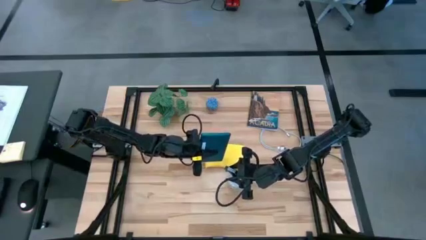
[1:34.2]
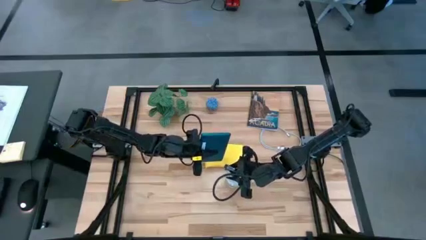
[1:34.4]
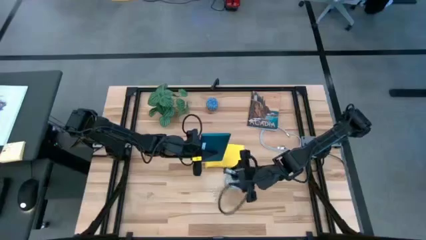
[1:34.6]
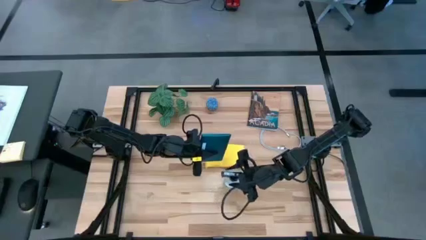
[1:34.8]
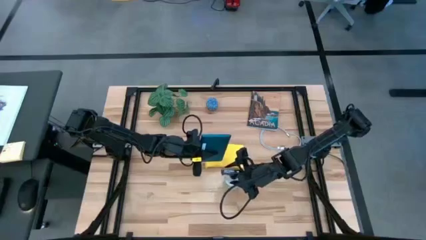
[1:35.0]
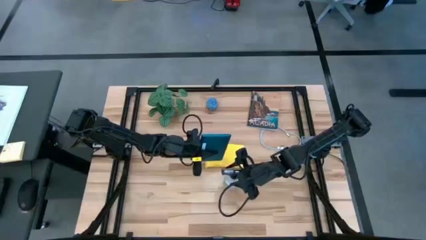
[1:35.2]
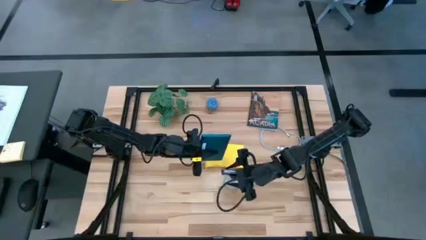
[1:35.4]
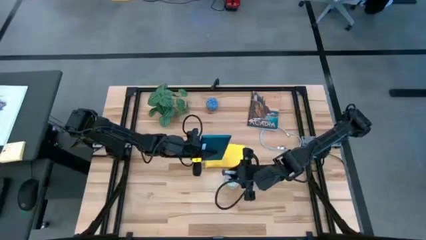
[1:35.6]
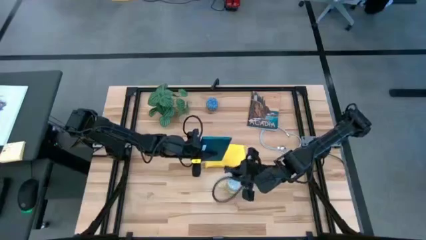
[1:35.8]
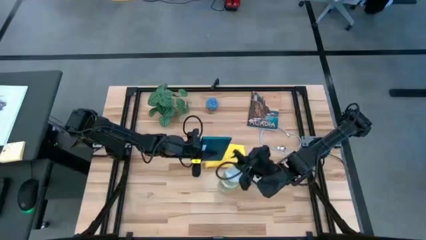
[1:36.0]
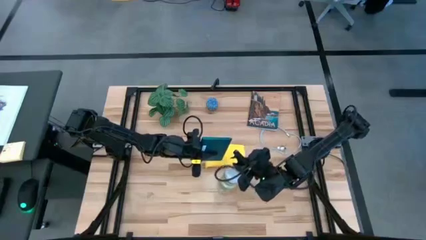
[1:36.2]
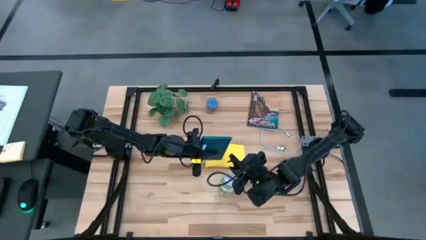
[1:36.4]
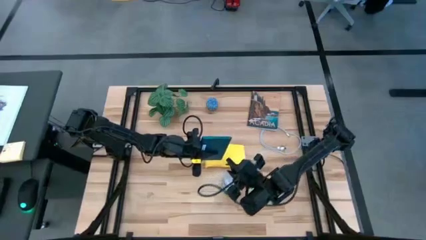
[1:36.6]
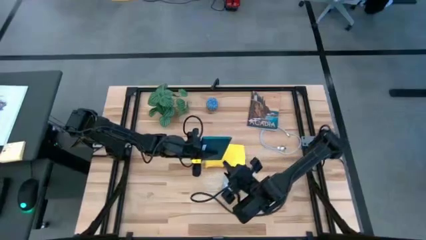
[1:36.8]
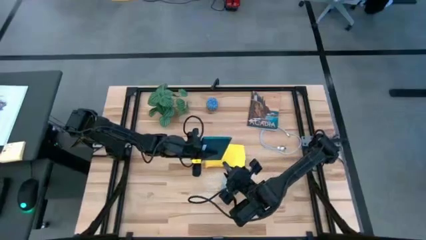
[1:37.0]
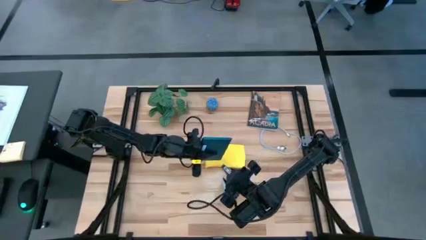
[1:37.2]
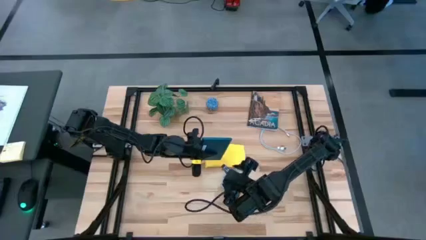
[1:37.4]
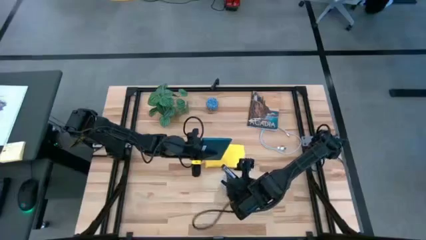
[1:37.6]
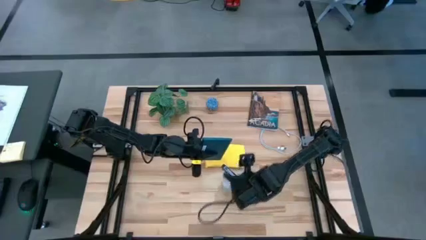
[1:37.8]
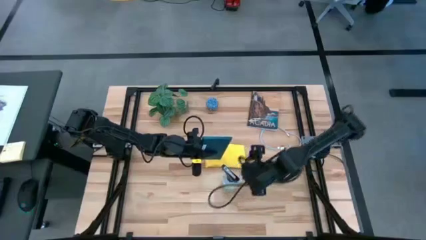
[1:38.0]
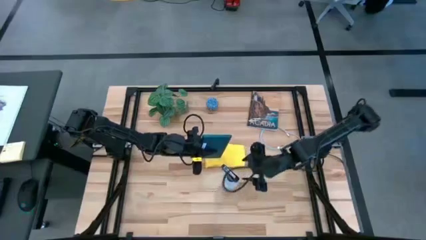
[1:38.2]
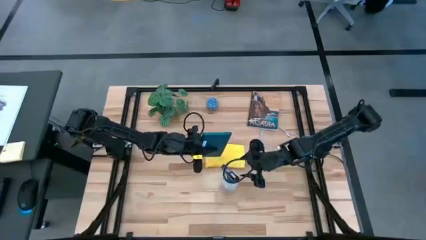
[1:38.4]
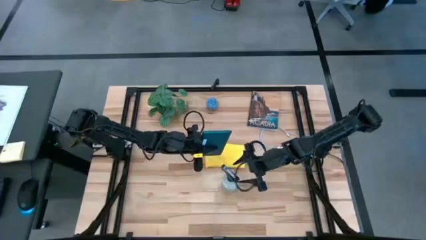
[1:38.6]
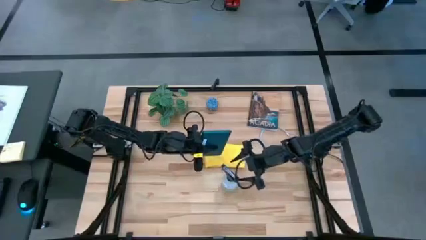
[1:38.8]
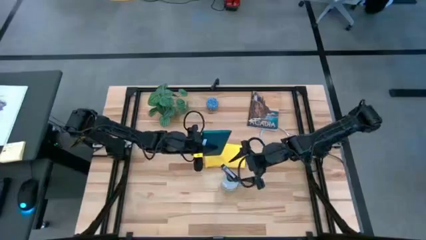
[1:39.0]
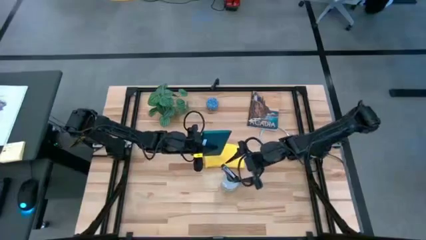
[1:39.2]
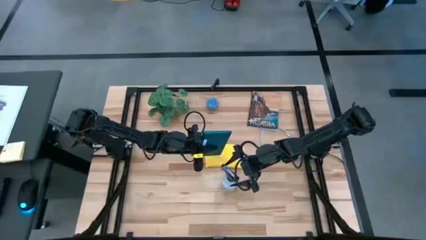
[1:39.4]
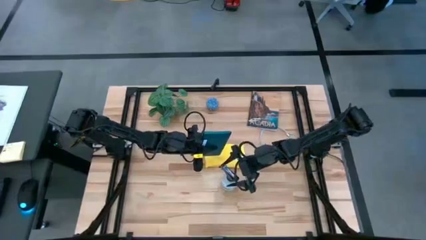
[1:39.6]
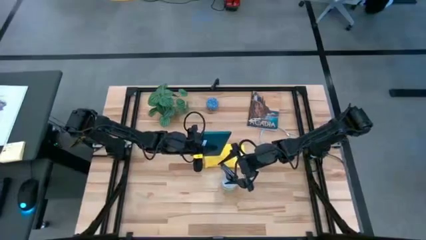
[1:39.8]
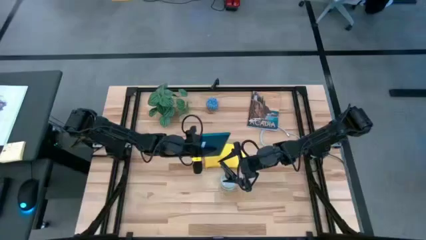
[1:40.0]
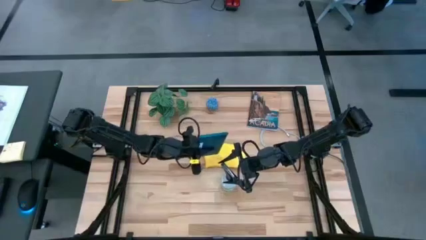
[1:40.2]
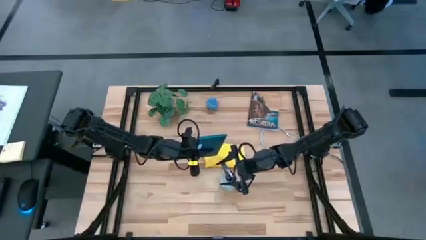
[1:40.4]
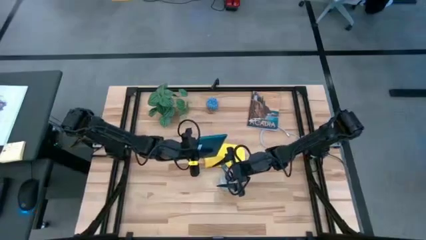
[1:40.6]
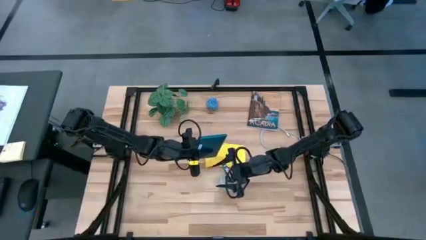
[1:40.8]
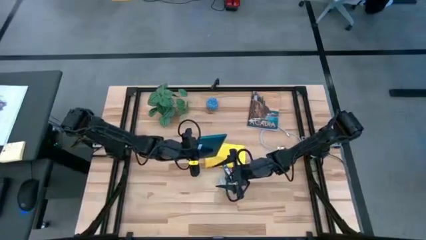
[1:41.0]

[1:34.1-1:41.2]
Task: Apply microfiber cloth
Spray the back of the blue tablet using the white spray bottle

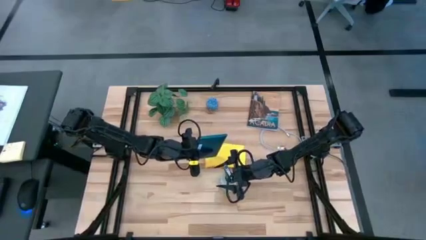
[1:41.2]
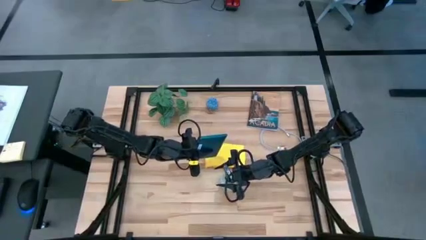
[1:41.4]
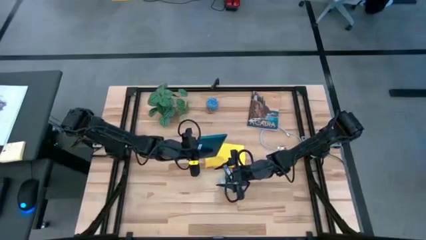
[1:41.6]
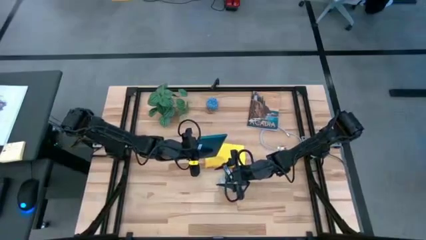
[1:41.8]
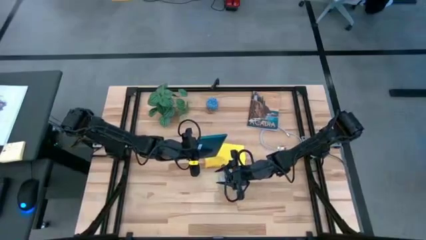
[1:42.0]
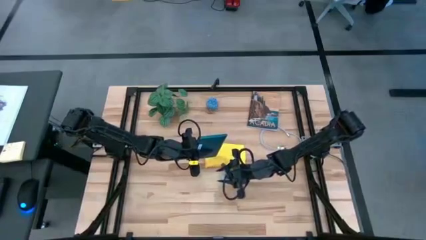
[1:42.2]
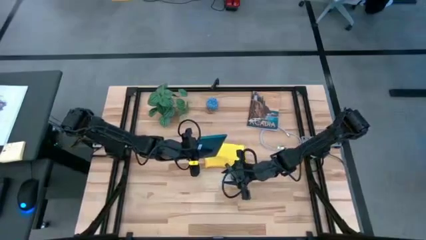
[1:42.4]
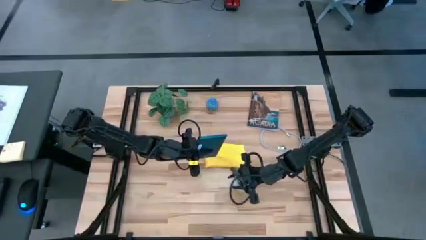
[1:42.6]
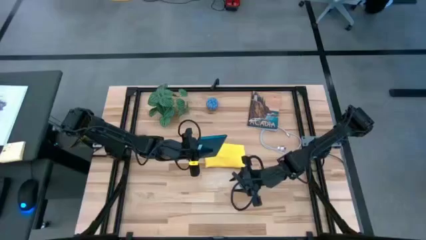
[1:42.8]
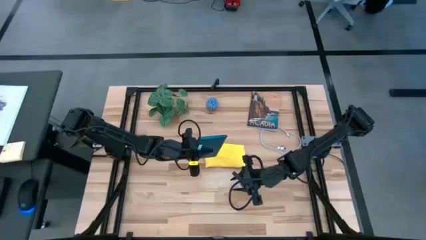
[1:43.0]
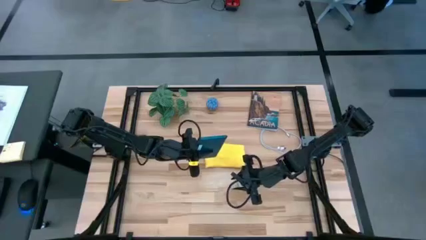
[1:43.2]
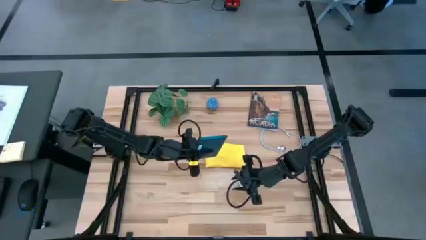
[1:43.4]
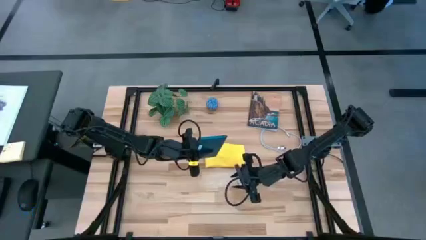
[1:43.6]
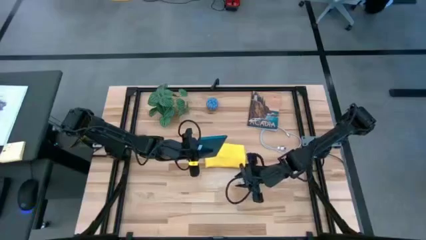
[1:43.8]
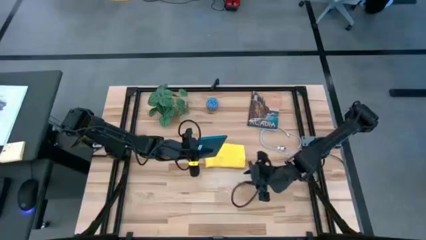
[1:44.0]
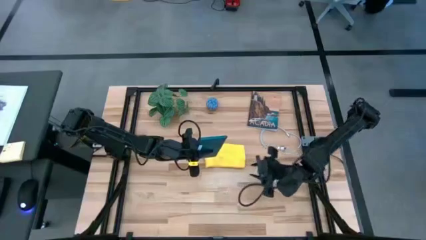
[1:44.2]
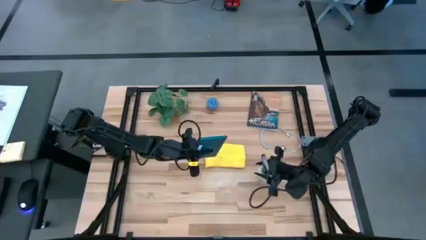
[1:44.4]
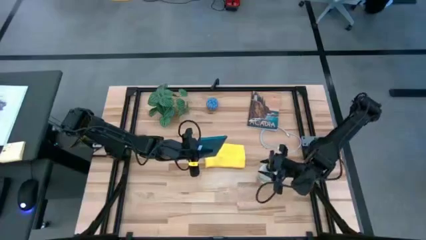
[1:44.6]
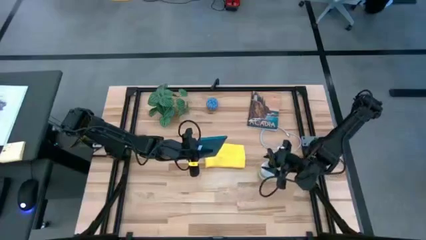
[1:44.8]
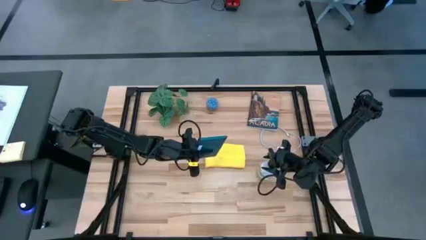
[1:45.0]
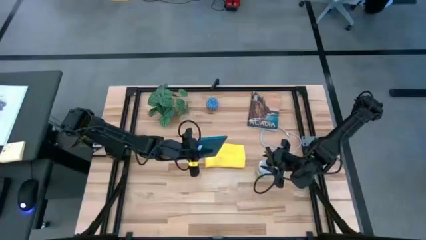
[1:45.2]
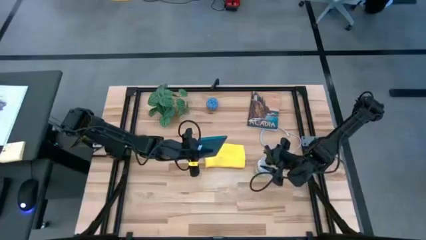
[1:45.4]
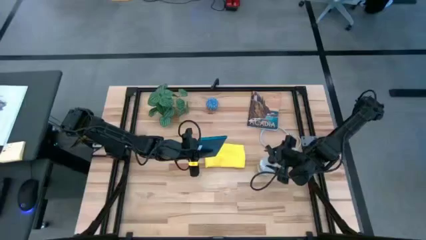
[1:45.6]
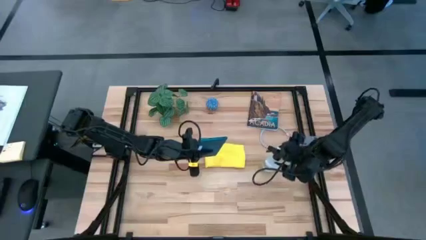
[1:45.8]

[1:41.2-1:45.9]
Spray the back of the blue tablet using the white spray bottle

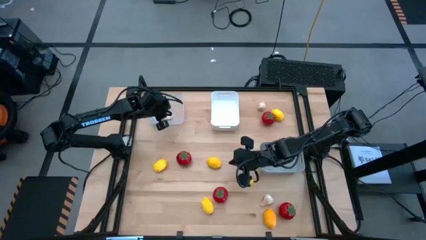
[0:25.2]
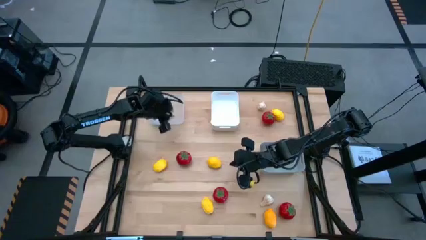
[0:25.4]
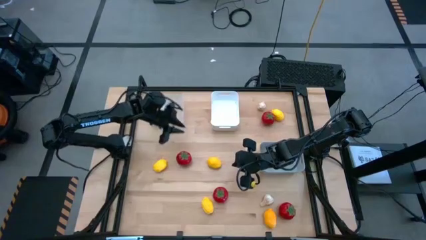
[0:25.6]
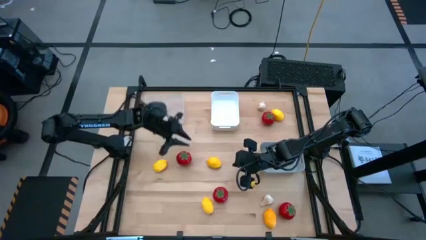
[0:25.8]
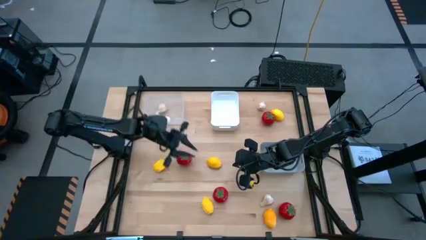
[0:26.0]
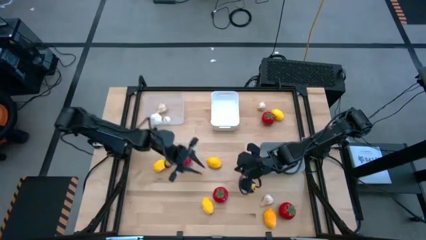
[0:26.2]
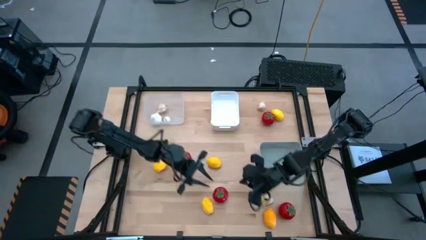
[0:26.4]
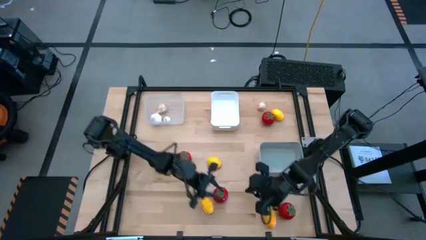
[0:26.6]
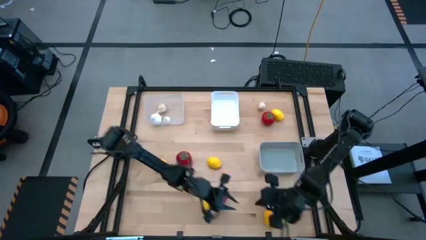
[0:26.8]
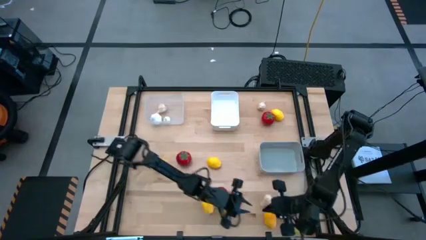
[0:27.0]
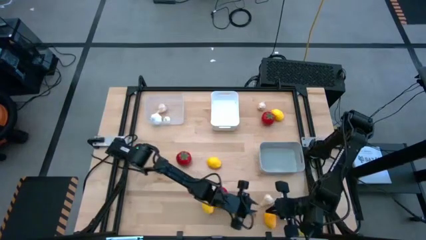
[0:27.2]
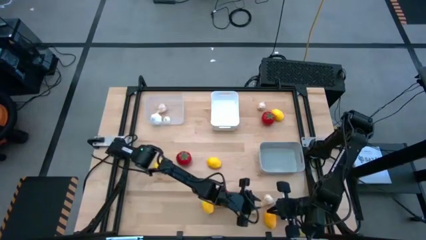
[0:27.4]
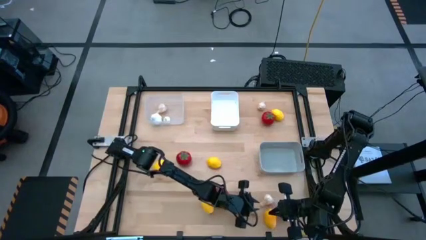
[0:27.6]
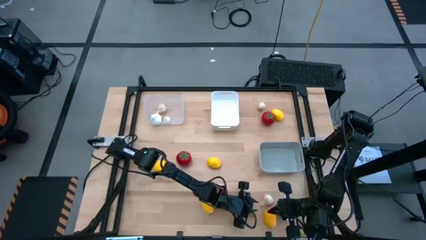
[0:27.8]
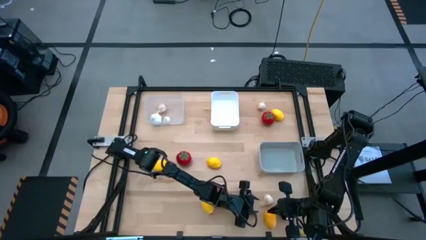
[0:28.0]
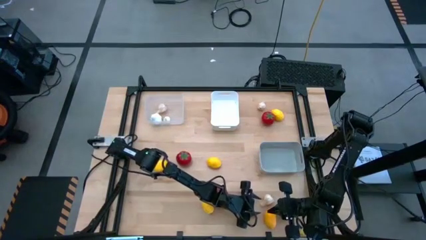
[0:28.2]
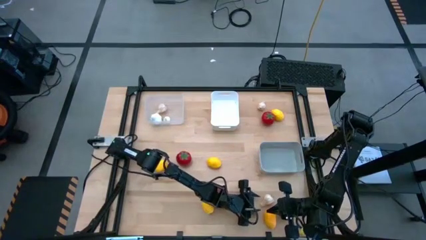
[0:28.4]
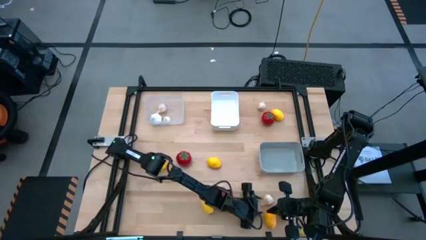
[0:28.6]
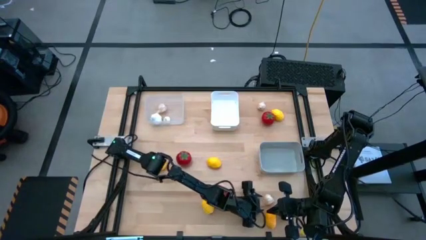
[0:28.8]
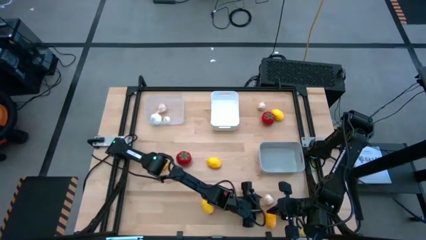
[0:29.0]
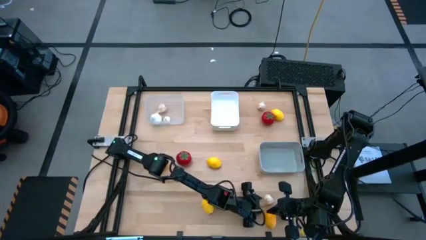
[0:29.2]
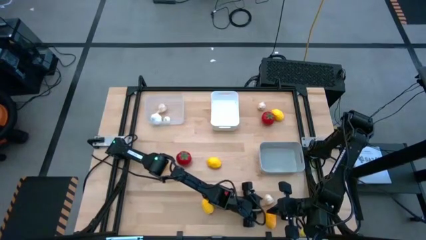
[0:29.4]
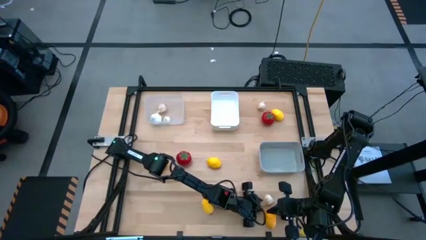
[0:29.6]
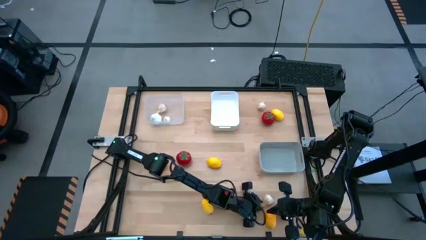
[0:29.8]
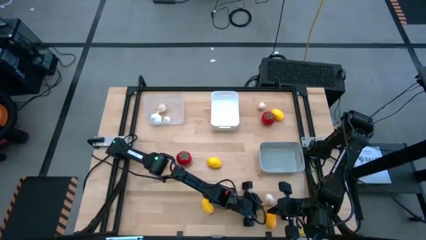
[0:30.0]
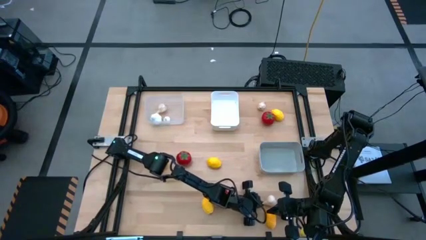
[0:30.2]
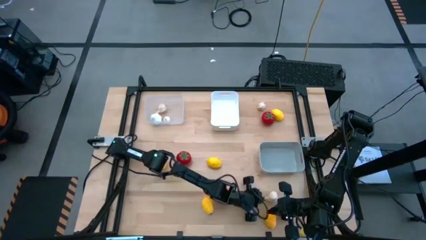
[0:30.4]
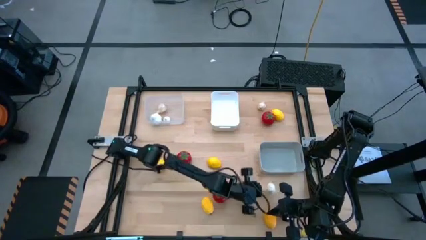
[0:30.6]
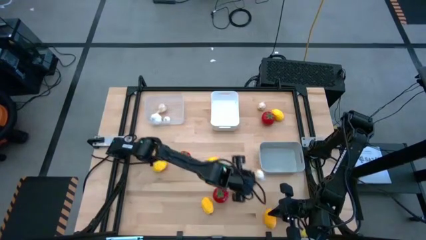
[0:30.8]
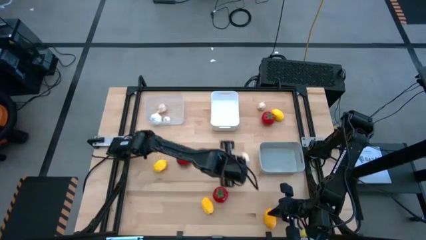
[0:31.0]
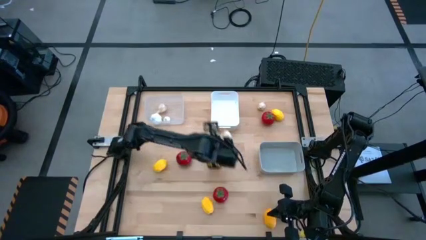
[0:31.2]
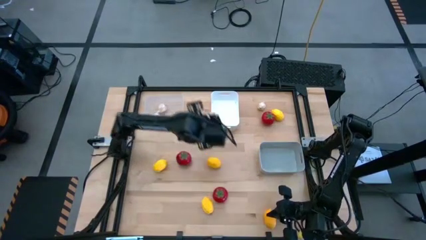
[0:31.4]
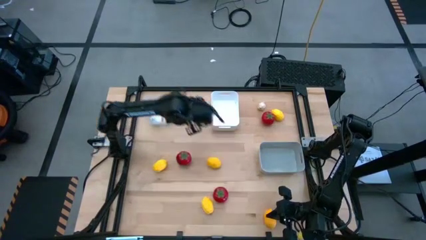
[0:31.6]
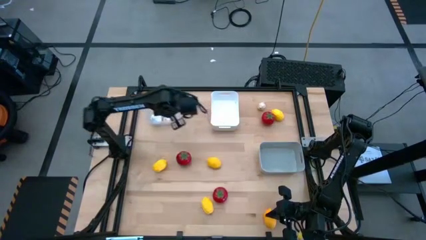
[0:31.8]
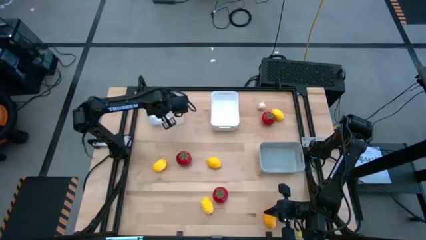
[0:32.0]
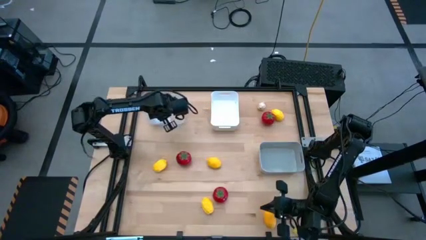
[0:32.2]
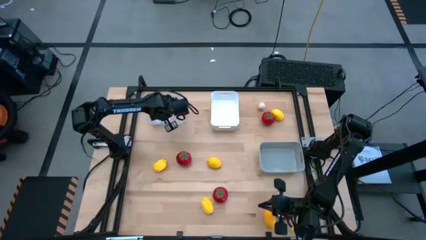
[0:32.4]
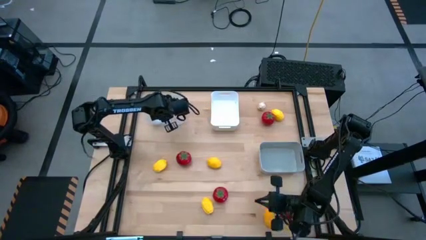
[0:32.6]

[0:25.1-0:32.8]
Task: Sort produce into baskets
Put the garlic into the transparent bin
